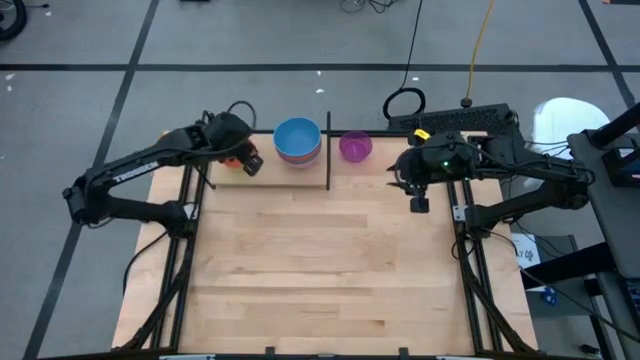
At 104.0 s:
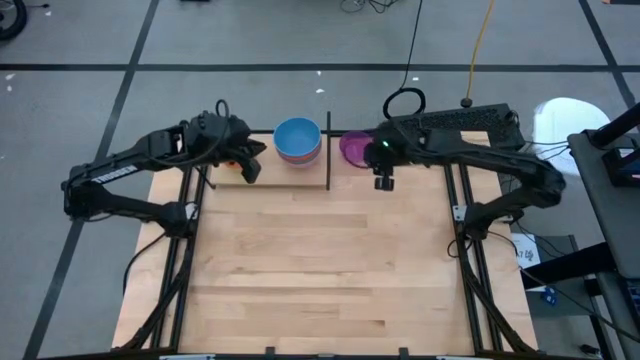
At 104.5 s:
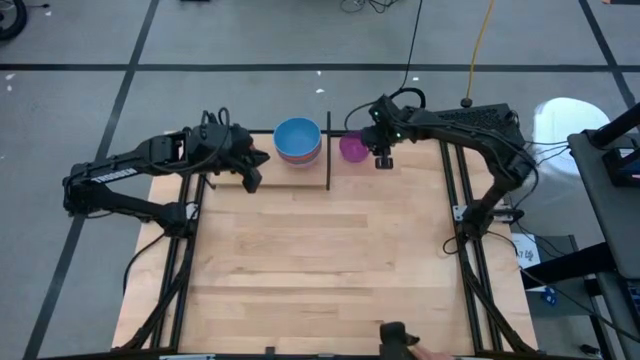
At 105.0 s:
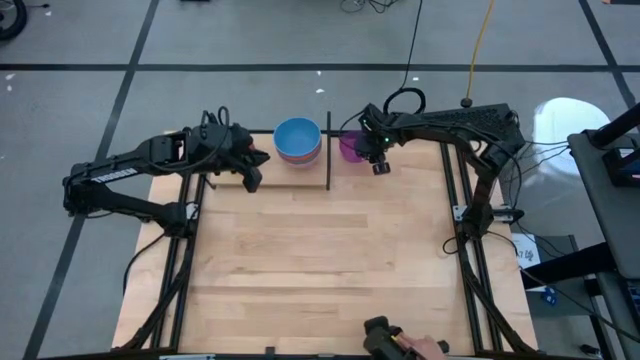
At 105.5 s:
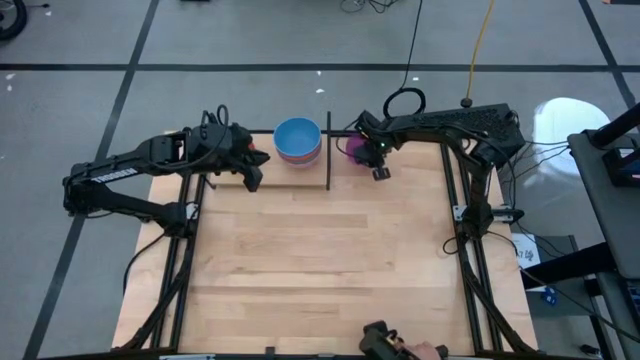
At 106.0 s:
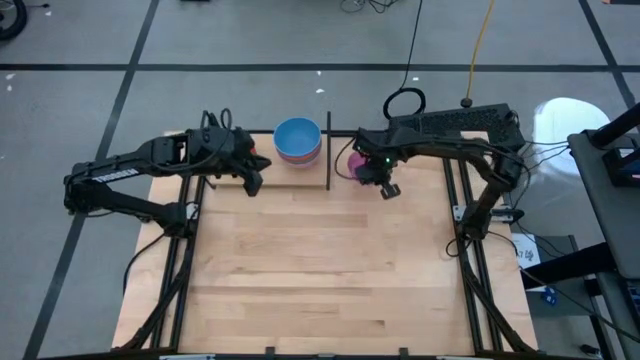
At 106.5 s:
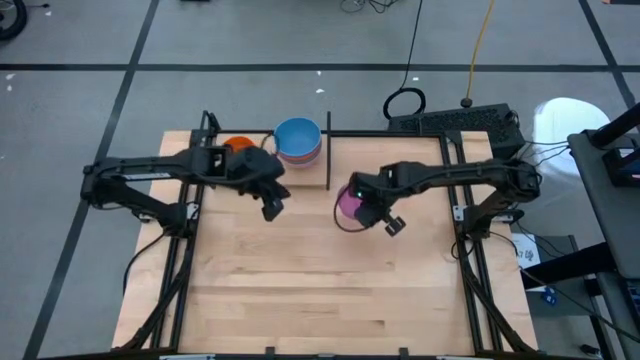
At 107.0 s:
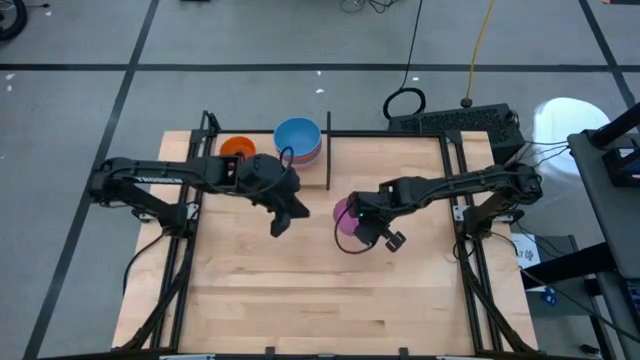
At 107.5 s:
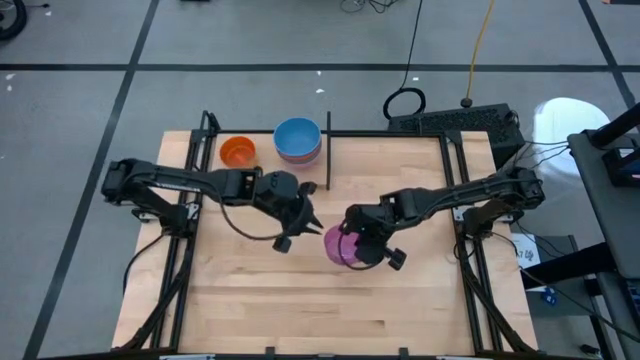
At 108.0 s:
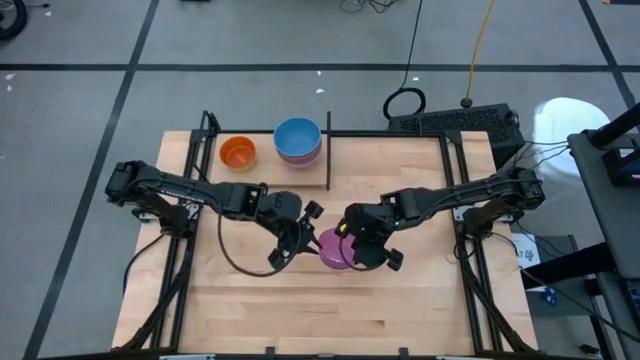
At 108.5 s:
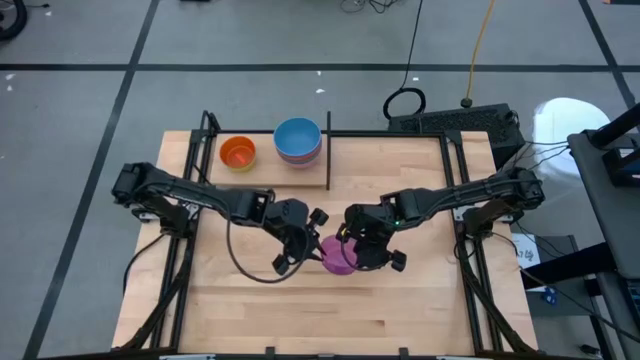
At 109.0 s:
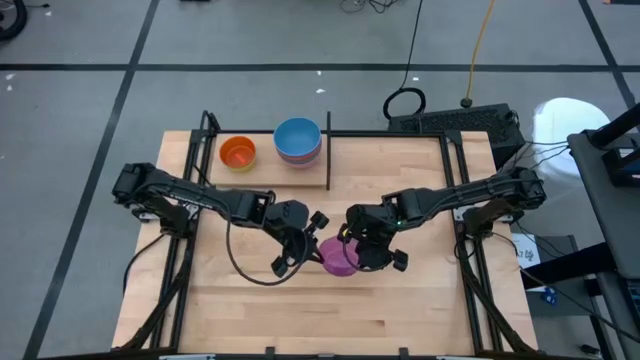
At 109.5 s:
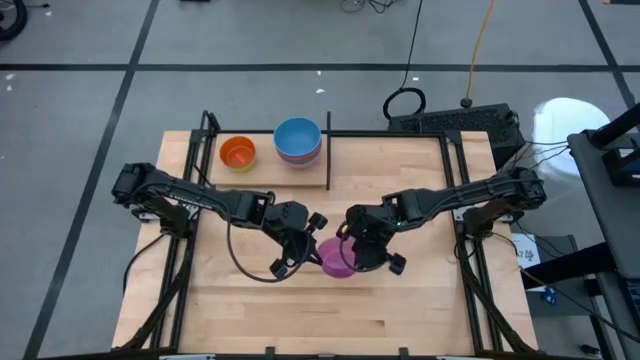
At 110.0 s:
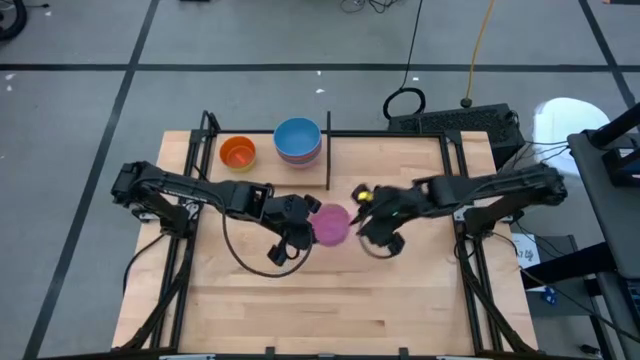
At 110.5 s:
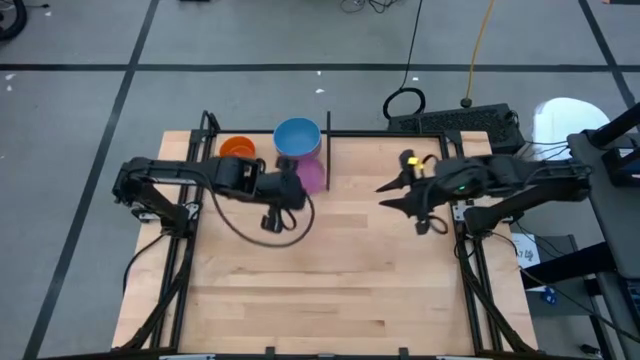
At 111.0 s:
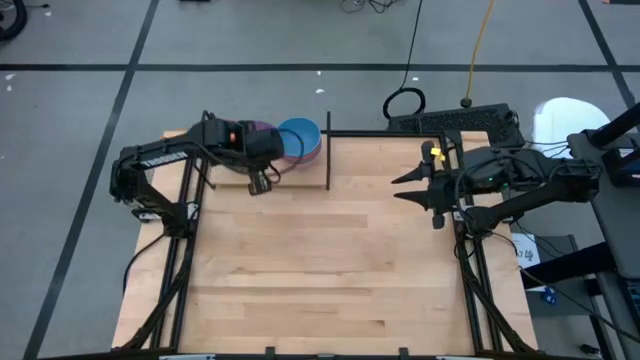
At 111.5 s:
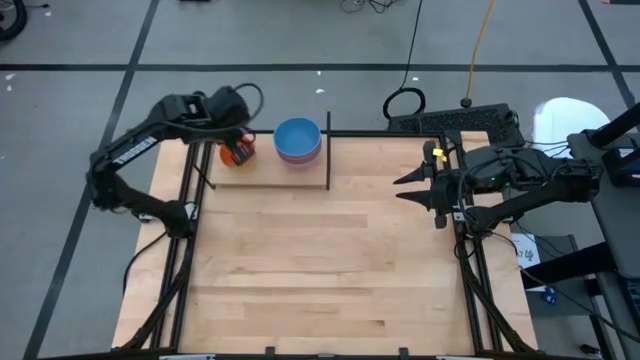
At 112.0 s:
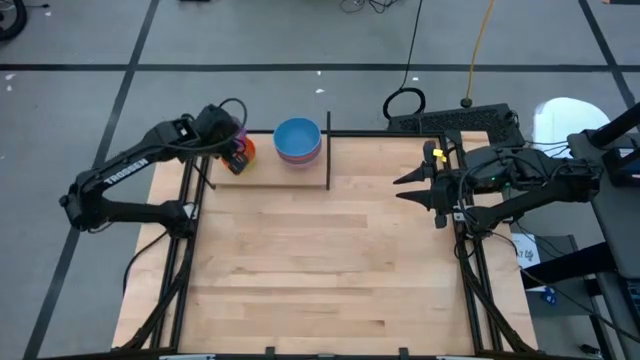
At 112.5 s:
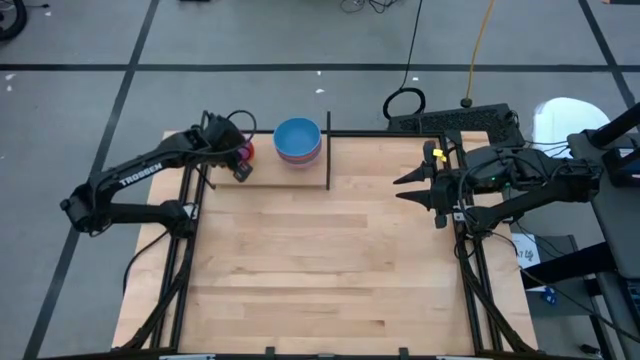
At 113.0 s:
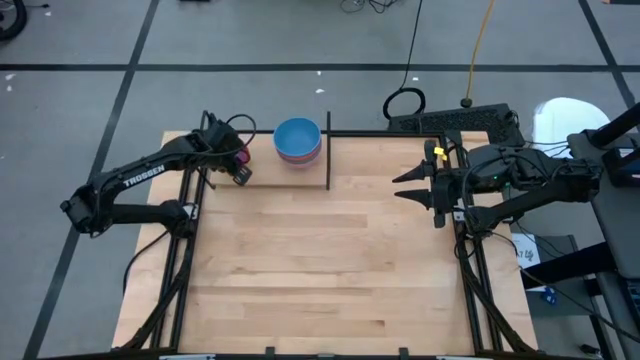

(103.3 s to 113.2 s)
Task: Place and stack bowls onto a shelf
Stack the small purple bowl into the orange bowl on the shelf

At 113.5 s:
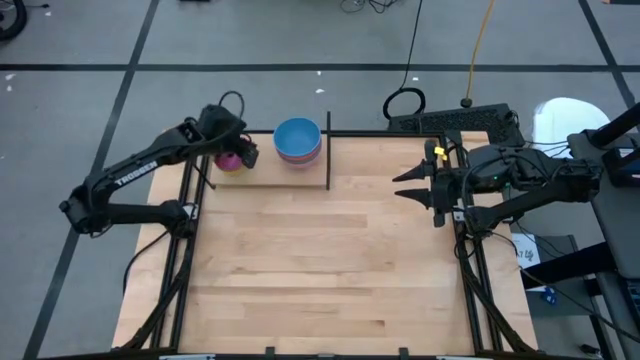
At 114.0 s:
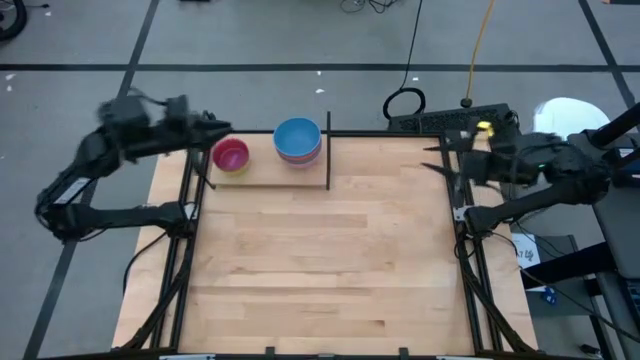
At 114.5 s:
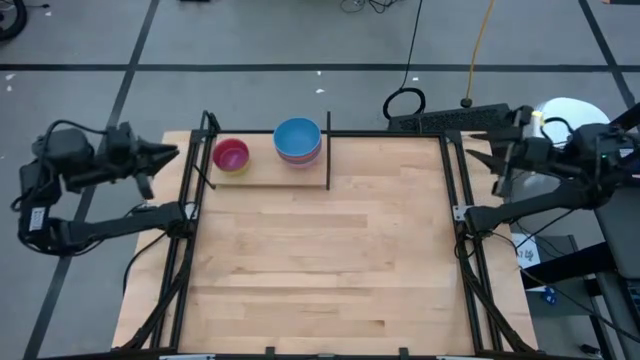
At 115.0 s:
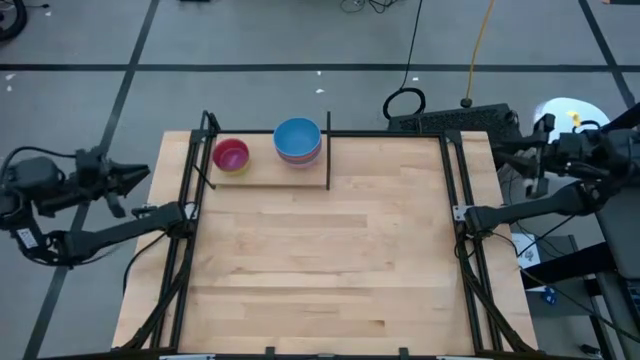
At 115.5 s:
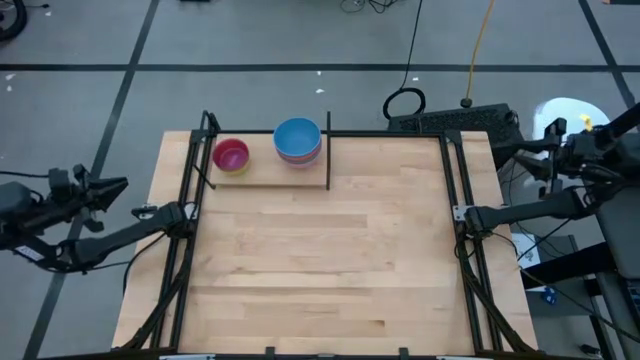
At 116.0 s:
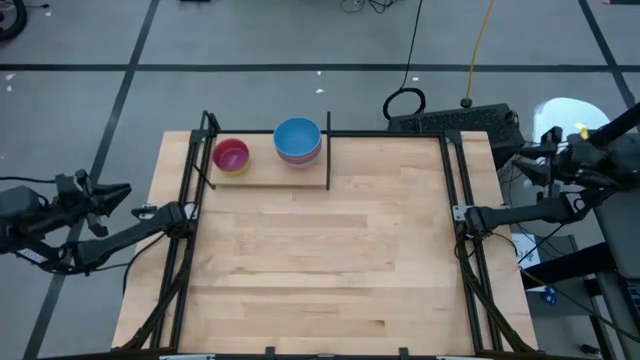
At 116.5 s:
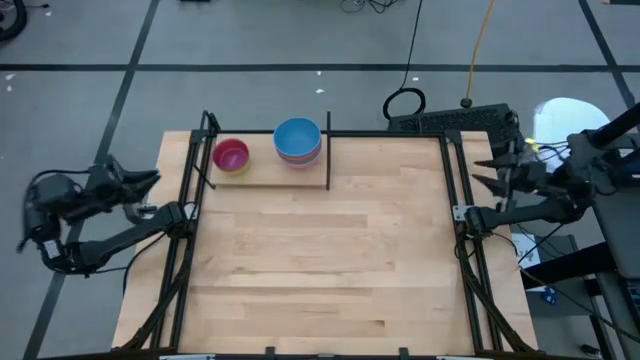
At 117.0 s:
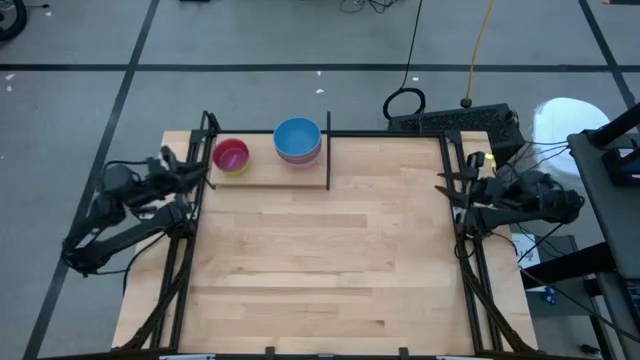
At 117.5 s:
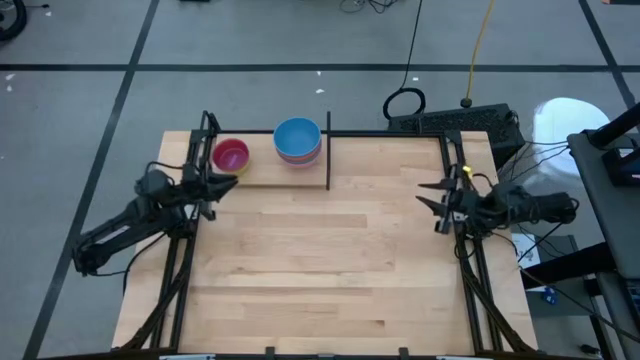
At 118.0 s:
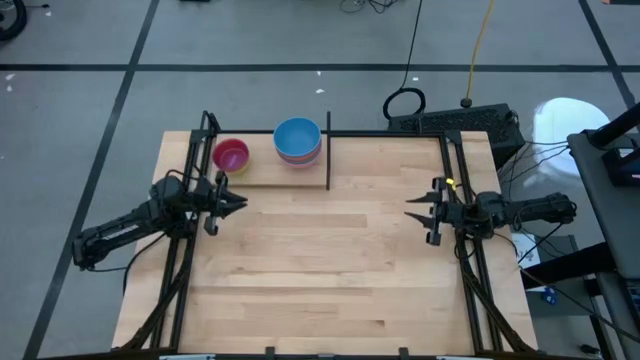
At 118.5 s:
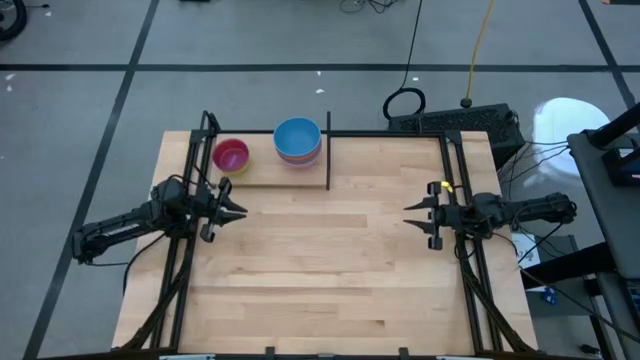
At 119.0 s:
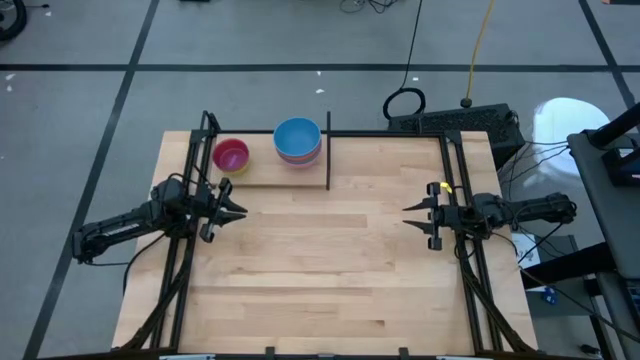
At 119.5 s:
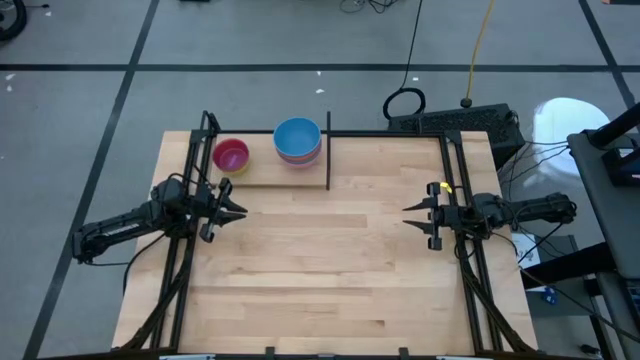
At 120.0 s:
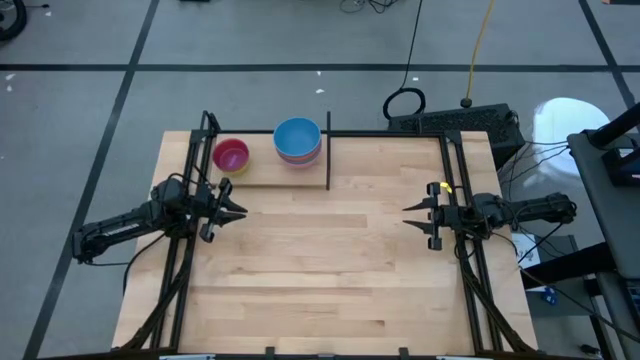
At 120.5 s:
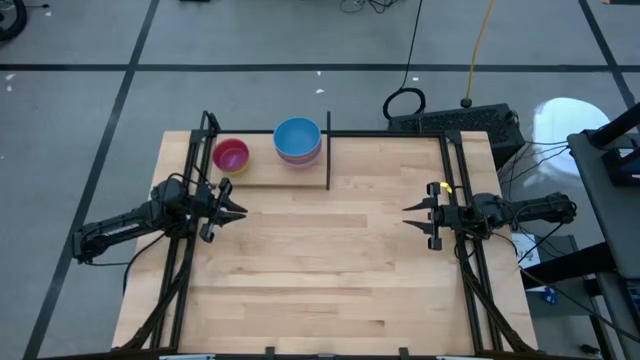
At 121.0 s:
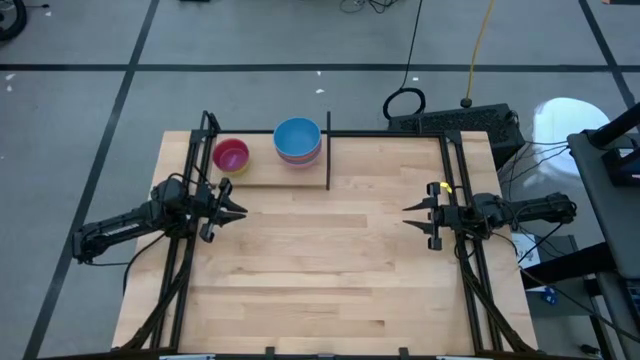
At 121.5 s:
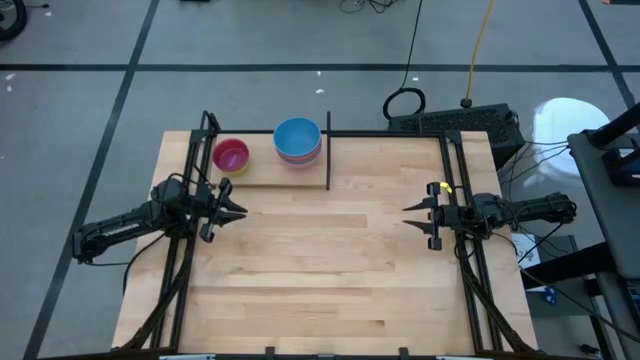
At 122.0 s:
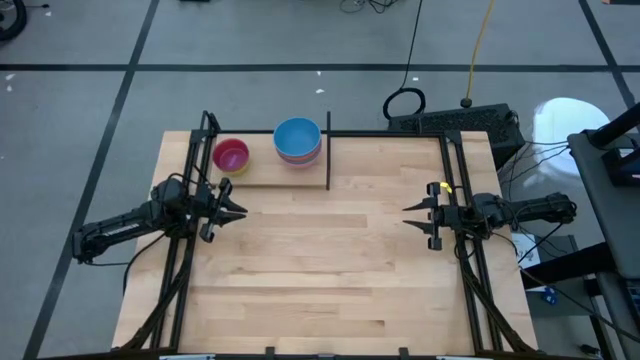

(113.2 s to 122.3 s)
Return to Home Position
